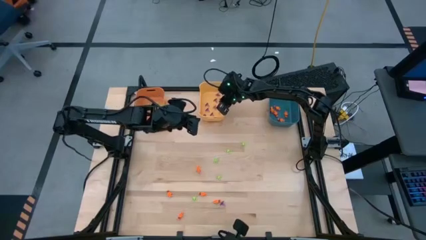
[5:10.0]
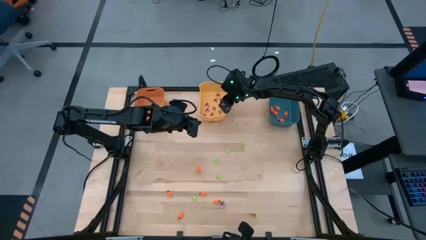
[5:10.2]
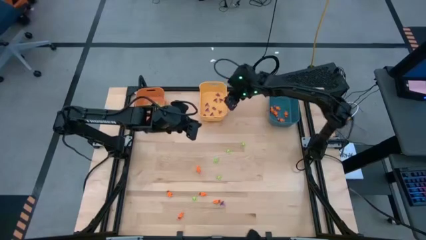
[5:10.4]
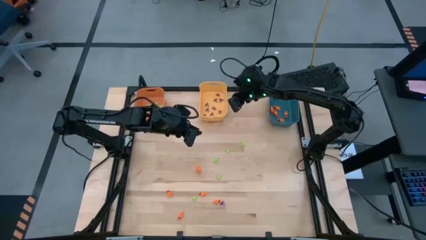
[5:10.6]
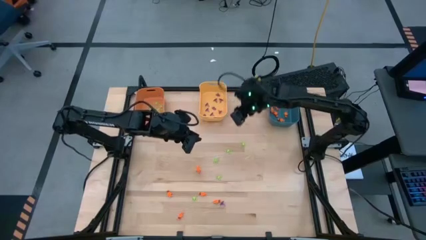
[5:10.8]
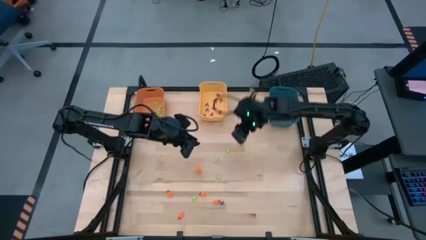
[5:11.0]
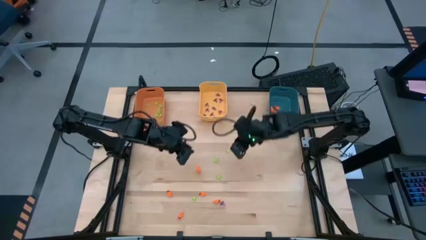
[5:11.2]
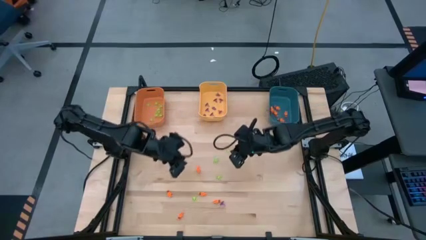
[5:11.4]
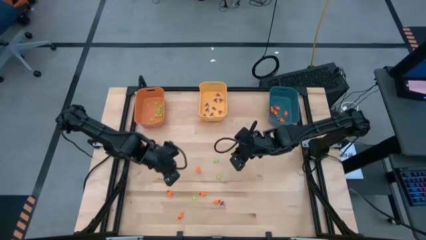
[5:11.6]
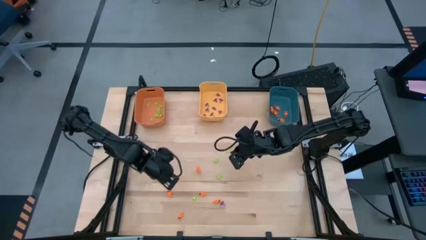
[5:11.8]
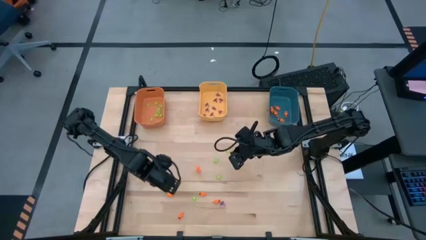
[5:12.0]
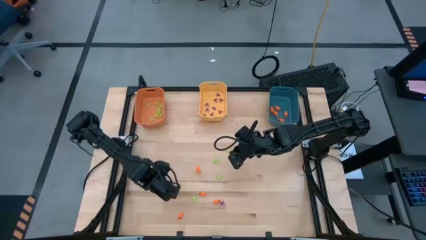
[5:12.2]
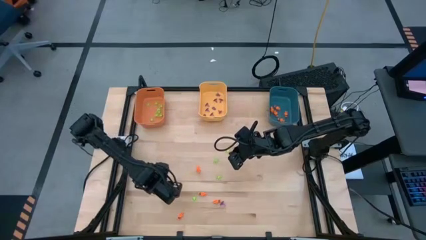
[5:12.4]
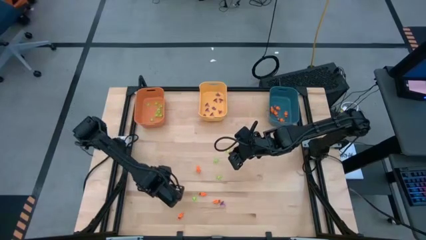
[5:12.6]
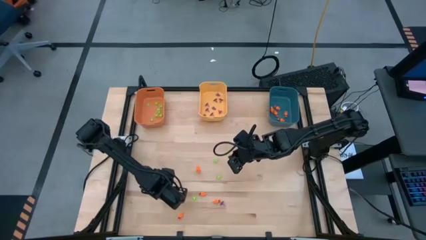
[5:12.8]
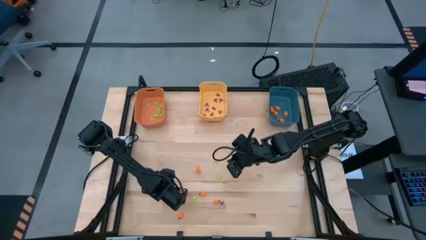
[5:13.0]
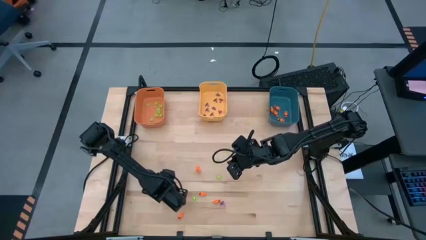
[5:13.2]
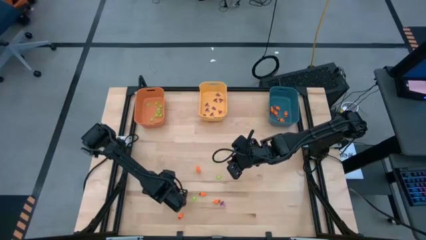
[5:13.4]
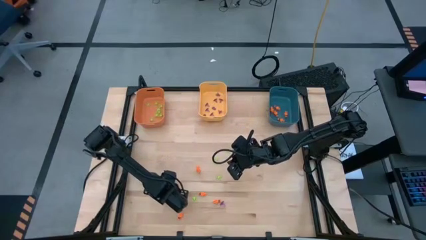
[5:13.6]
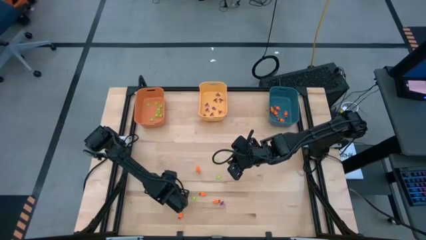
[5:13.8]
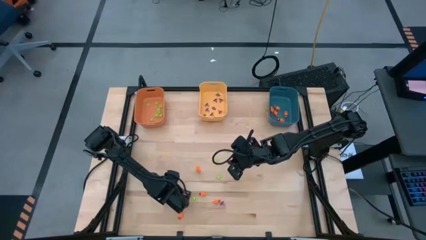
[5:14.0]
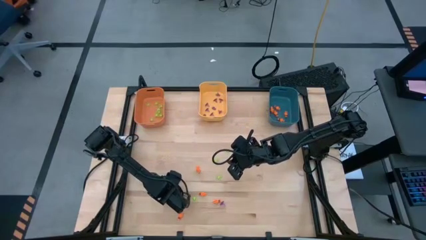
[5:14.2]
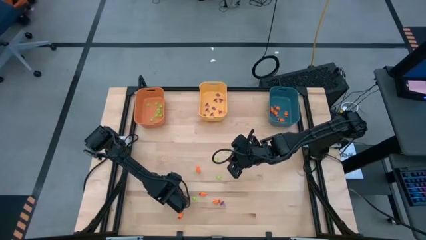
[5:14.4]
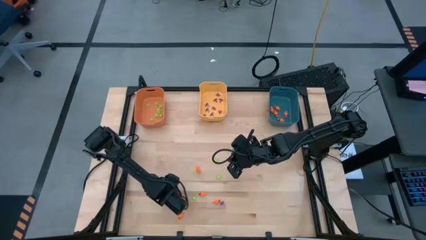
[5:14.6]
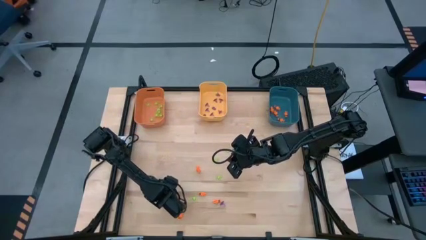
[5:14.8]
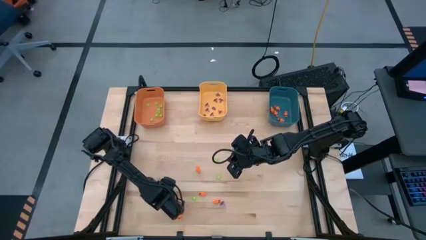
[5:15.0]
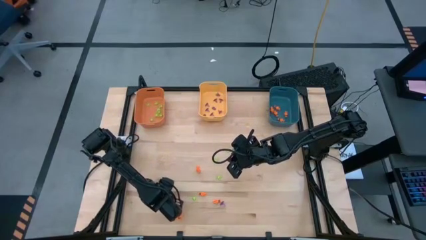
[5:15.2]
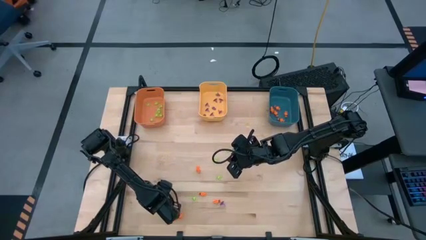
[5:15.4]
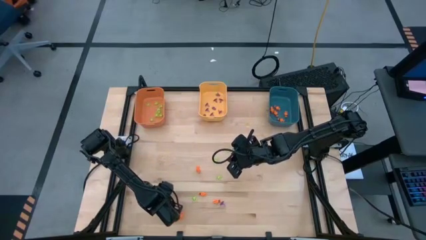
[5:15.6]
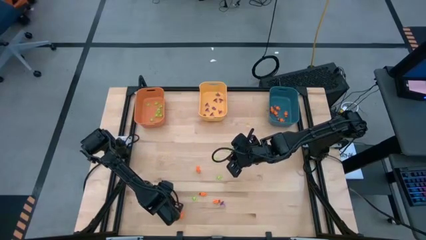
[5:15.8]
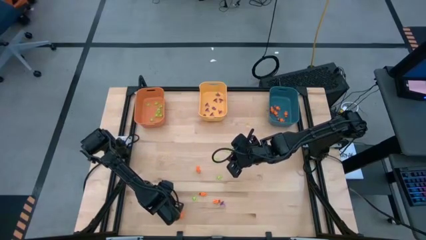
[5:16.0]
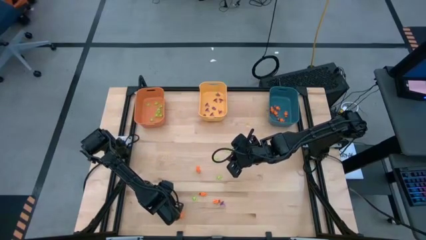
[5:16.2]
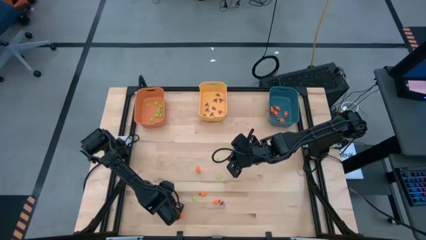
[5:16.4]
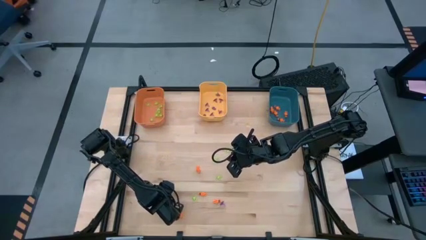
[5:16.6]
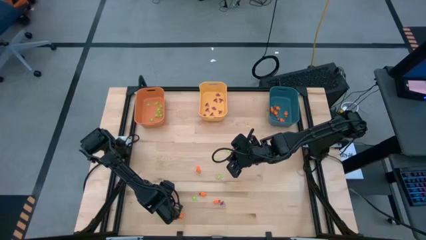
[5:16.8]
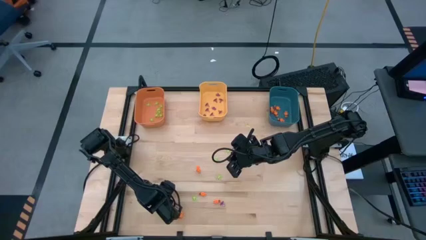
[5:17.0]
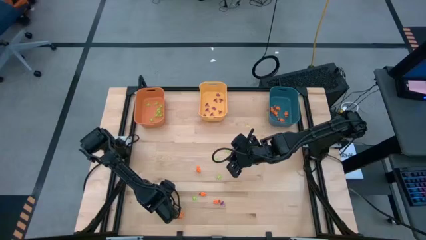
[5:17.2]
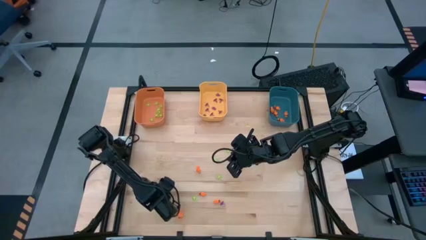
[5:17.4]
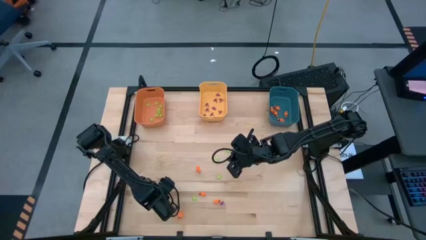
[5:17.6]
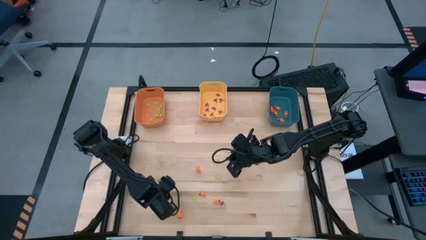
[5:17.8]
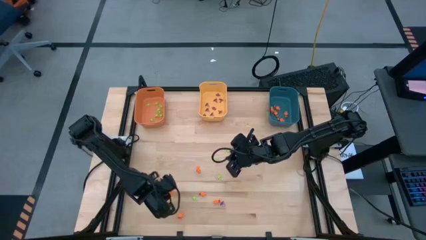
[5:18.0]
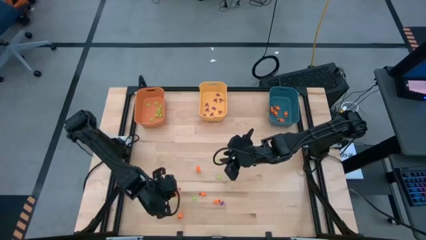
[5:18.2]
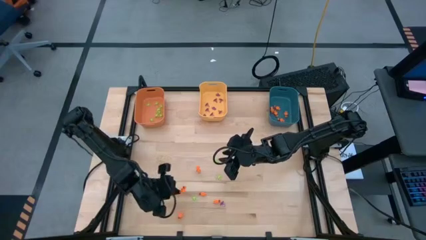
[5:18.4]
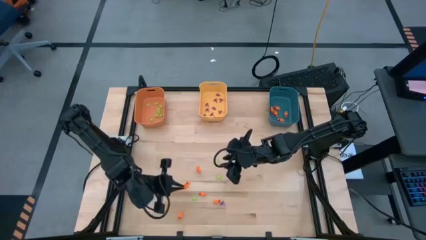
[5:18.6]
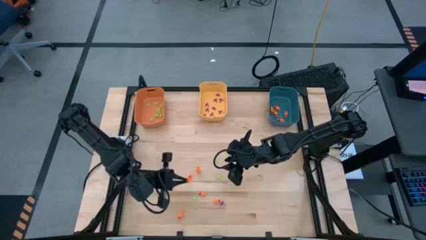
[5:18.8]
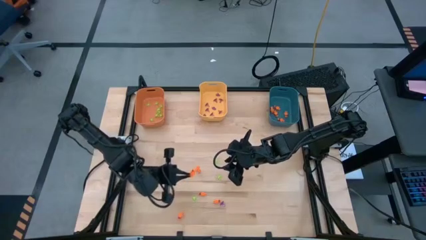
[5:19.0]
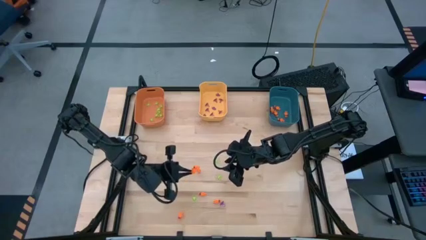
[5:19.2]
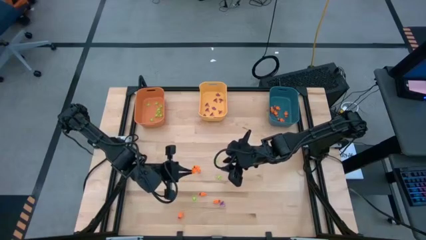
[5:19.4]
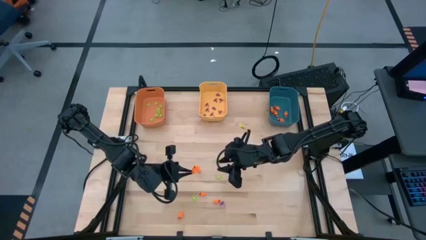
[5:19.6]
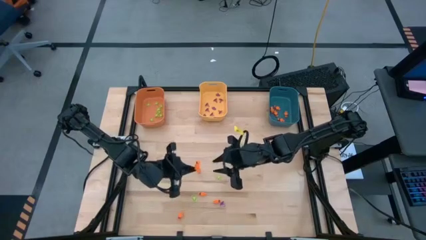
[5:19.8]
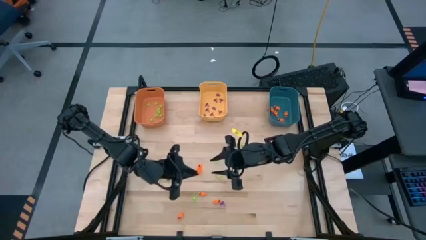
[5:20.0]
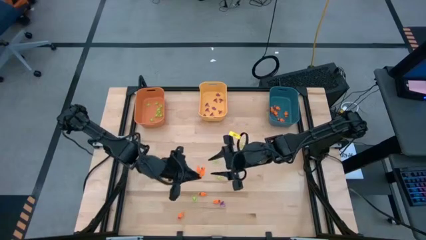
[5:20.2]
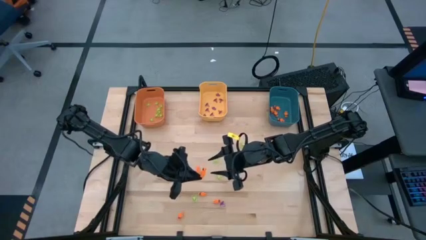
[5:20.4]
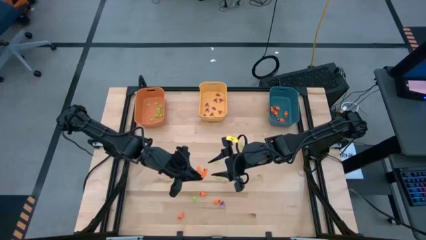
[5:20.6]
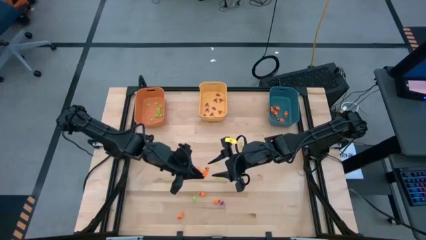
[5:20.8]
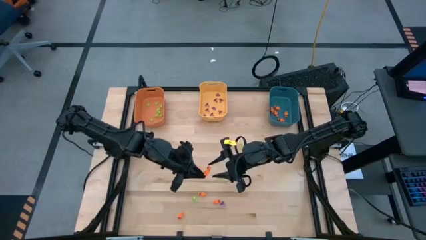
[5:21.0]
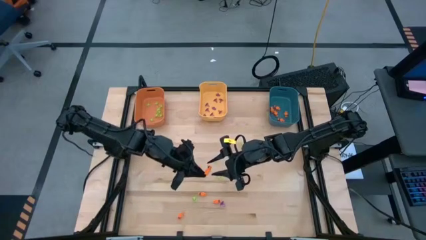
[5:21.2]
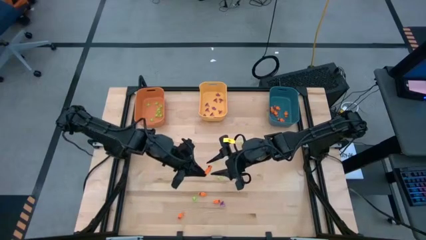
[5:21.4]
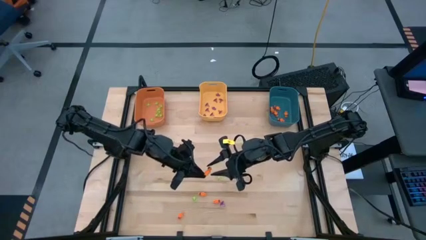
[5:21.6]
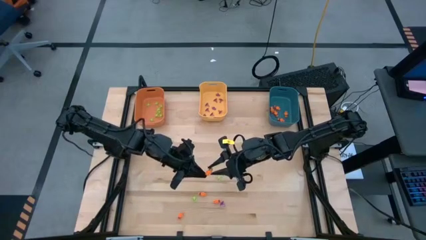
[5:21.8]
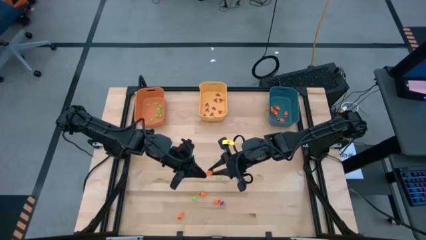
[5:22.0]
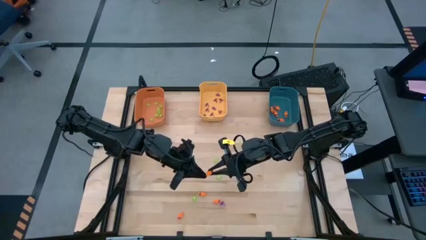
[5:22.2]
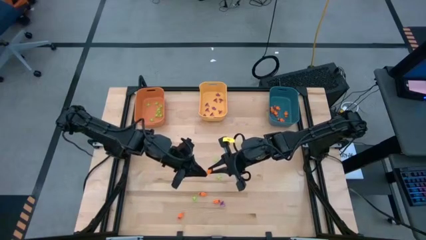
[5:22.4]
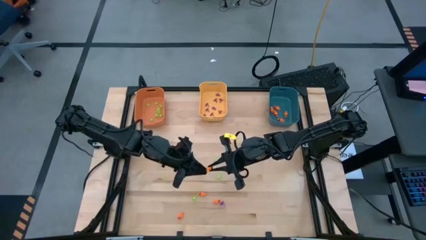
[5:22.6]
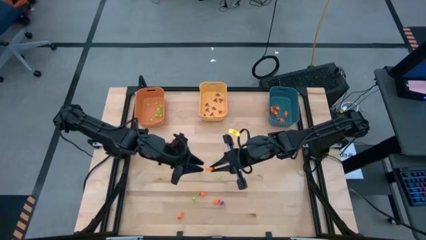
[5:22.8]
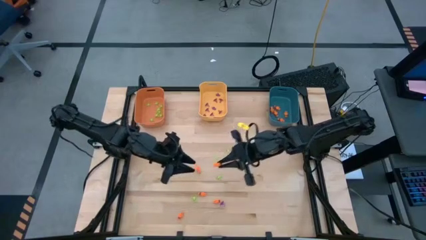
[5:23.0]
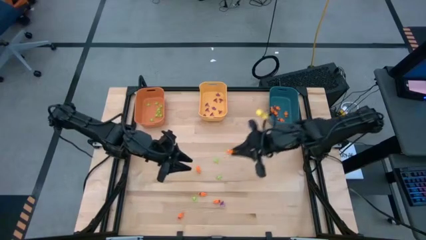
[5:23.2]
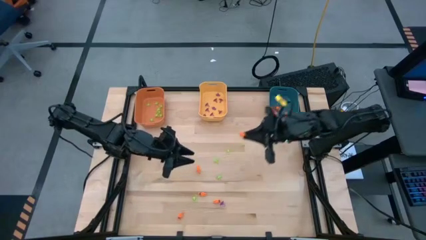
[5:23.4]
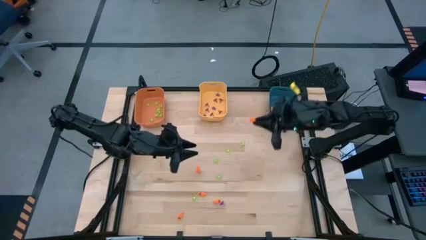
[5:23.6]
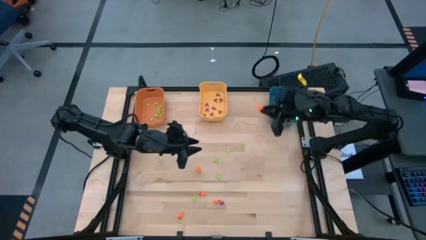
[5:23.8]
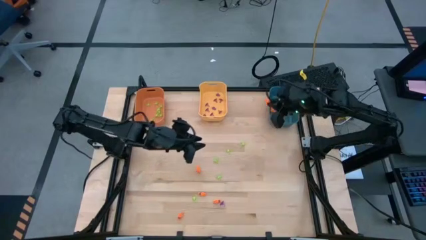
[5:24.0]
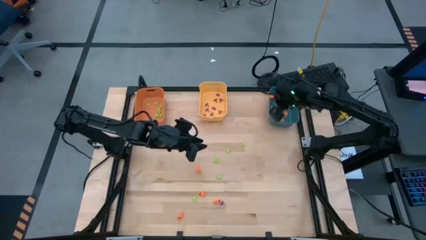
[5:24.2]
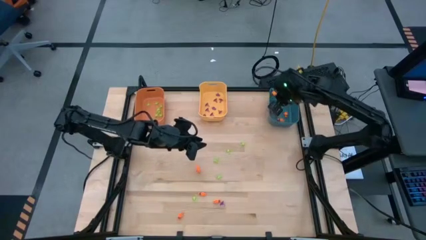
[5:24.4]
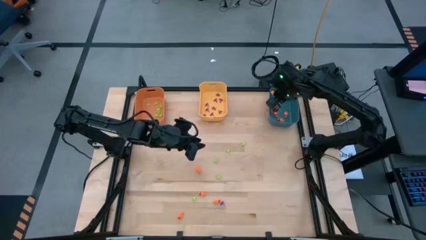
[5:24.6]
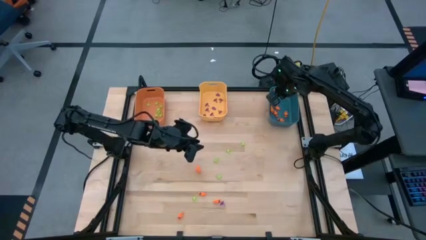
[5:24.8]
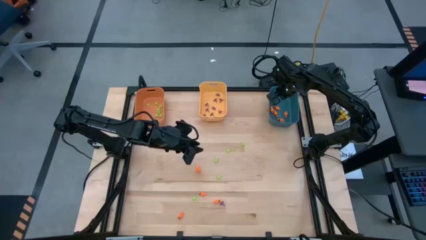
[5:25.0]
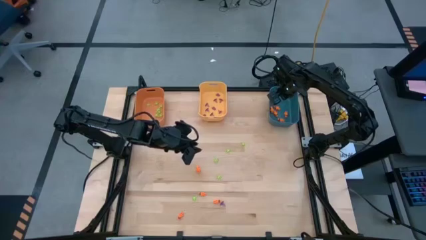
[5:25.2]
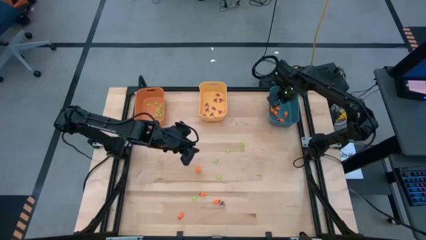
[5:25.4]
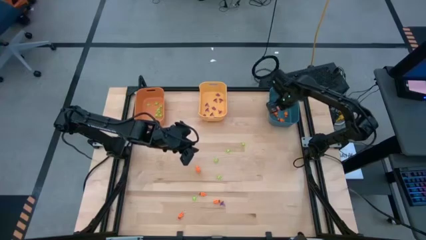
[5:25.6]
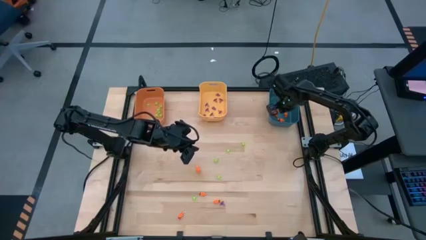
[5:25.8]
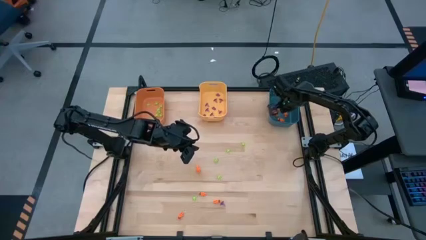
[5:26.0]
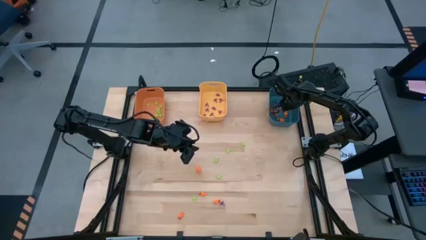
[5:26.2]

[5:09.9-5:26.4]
Task: Sort Halloween decoration
Put the orange skeleton toy into the blue bin
